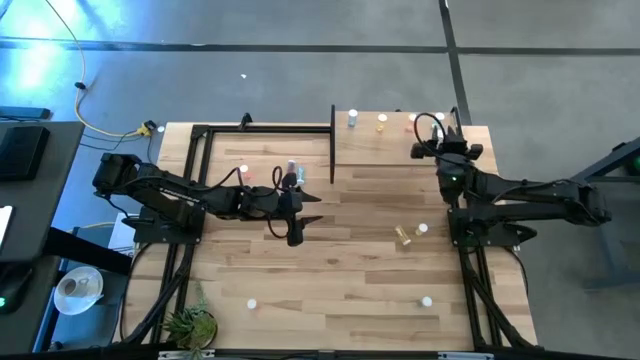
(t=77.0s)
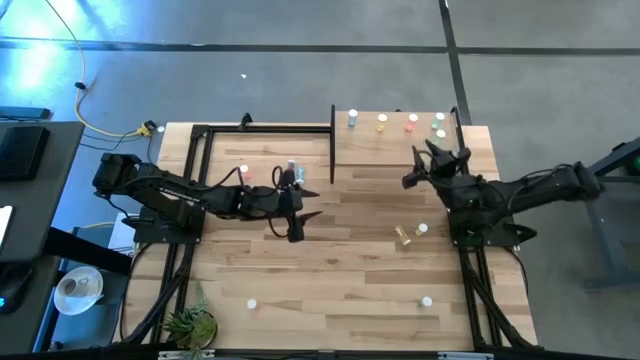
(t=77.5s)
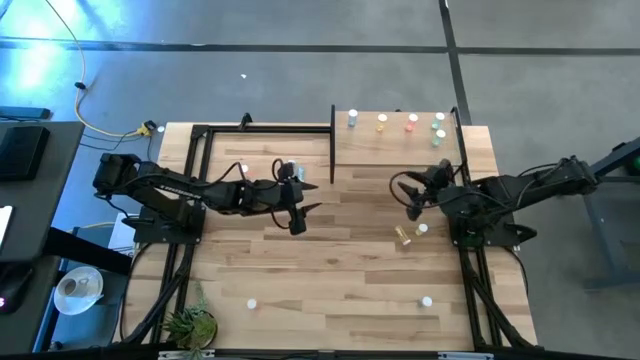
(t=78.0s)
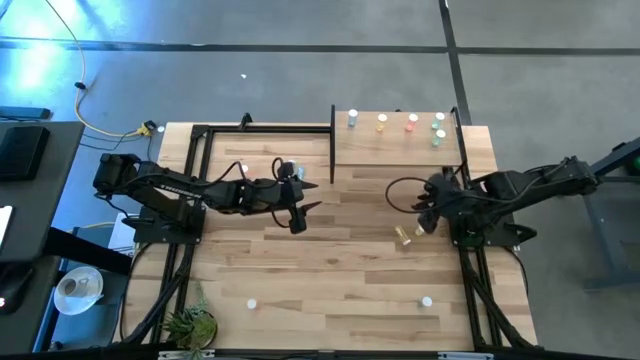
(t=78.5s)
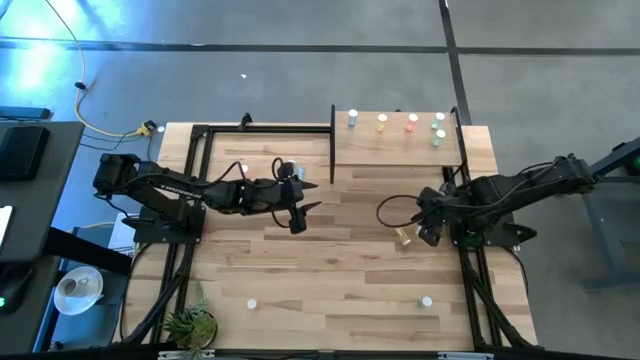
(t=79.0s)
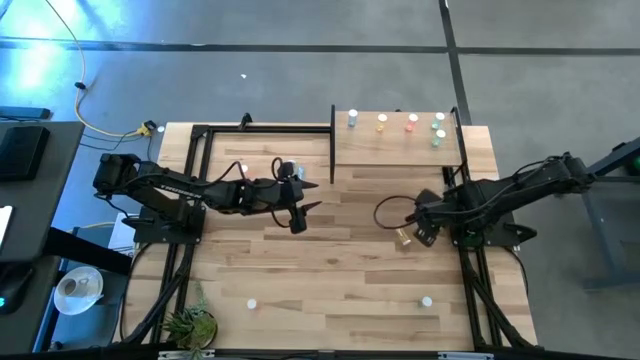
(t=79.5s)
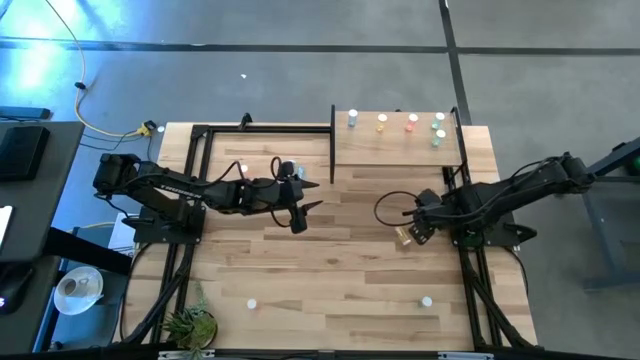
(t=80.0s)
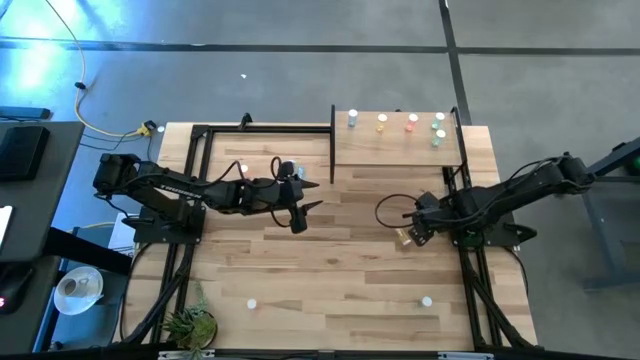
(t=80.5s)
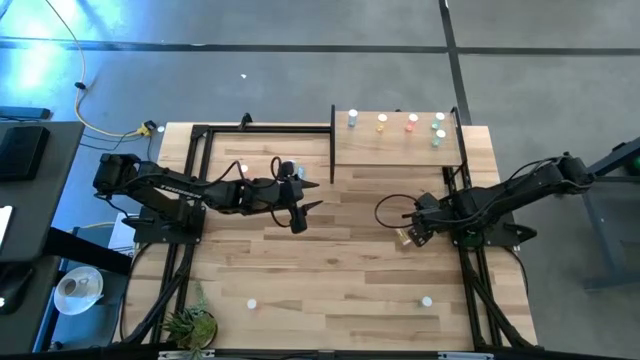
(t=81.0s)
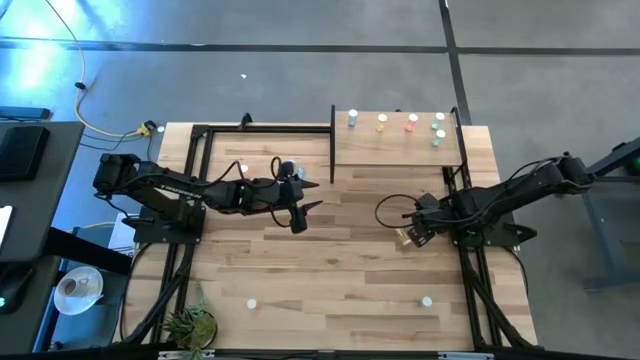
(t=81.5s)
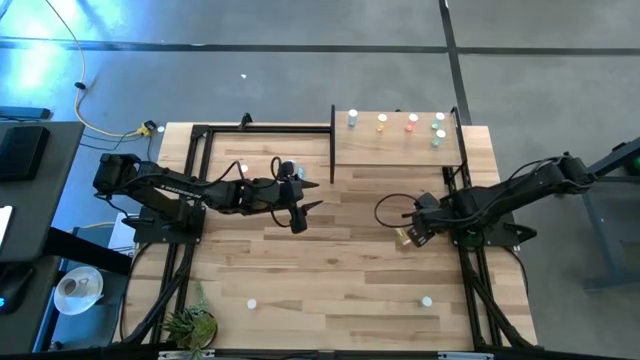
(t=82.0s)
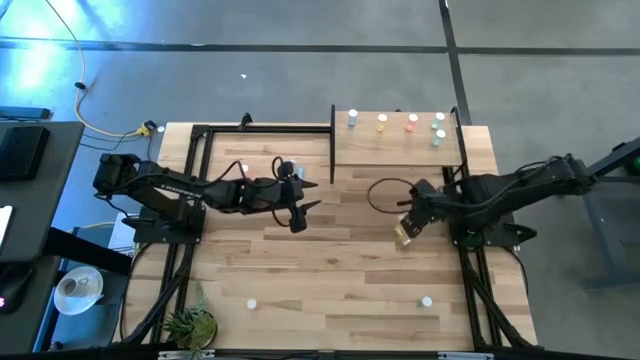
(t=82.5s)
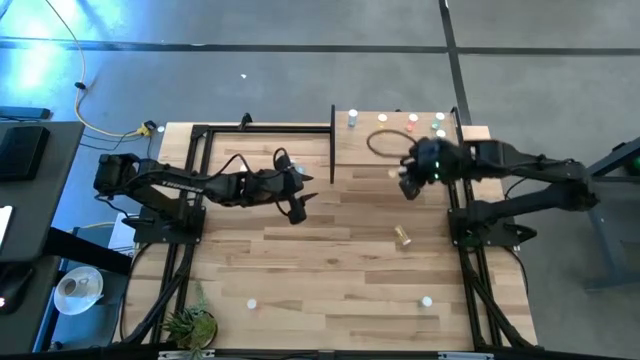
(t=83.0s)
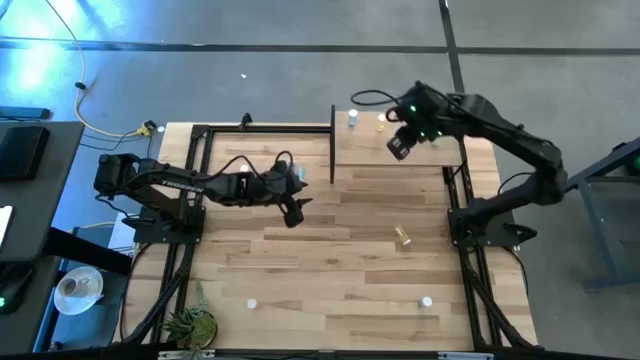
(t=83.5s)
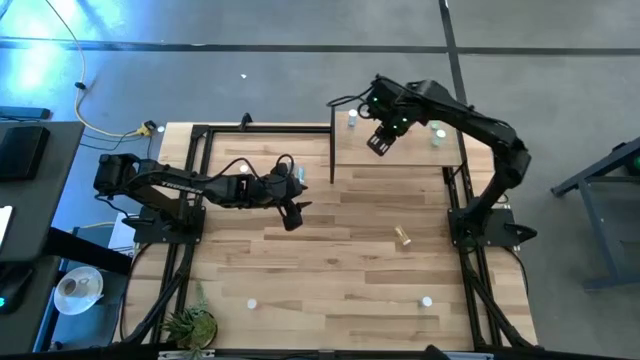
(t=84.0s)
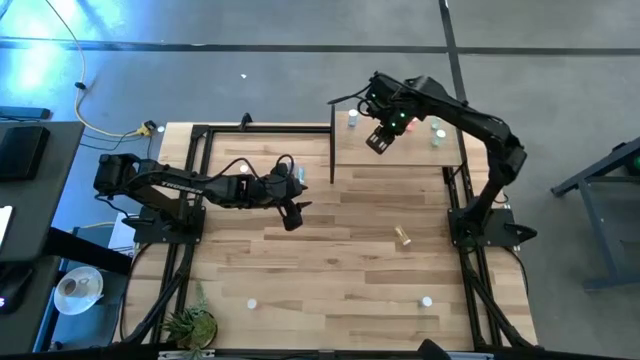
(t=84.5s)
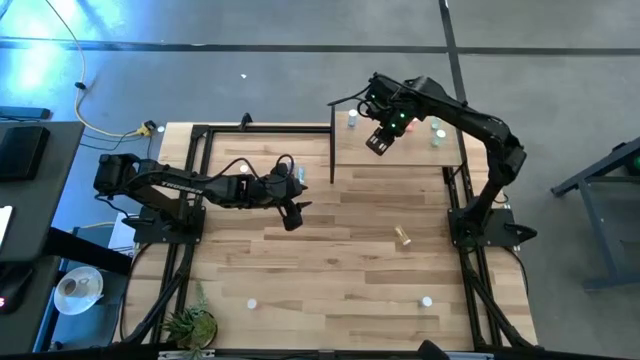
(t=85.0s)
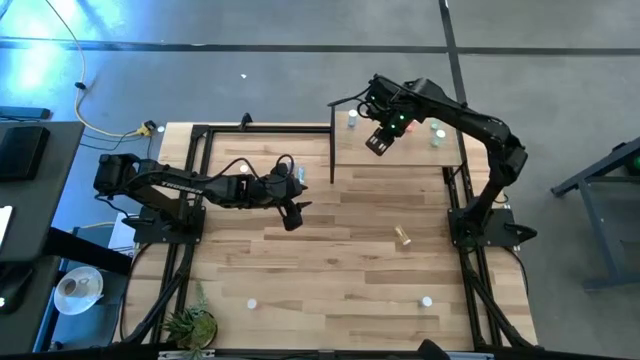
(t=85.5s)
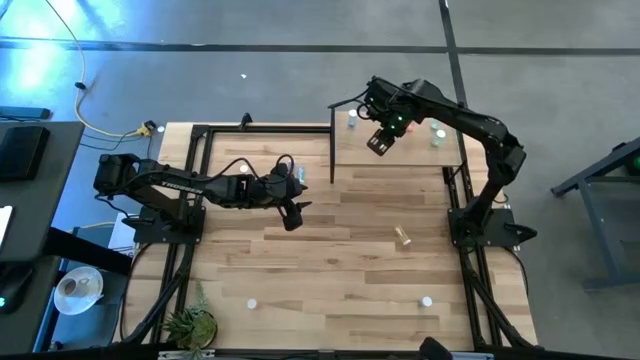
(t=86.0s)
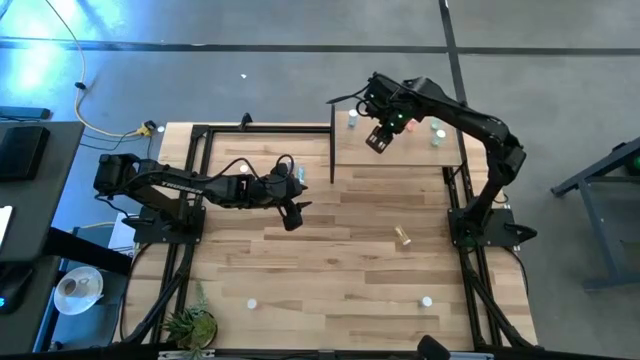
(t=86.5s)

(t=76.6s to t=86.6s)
Task: Pick and place medicine bottles onto shelf by color
Put the right yellow medicine bottle aligned with the other yellow medicine bottle on the shelf

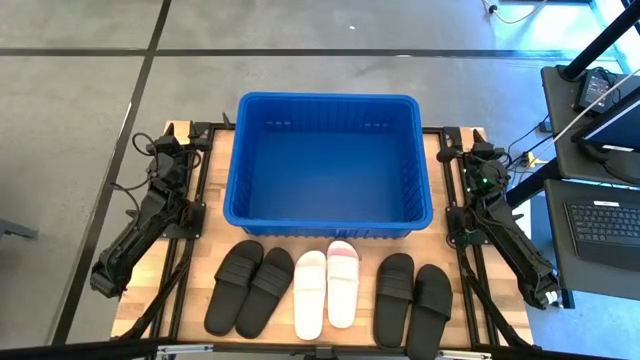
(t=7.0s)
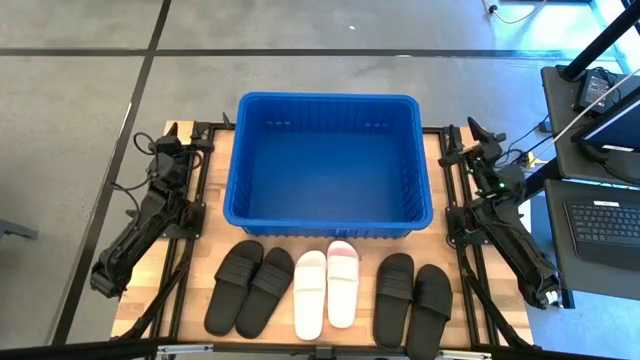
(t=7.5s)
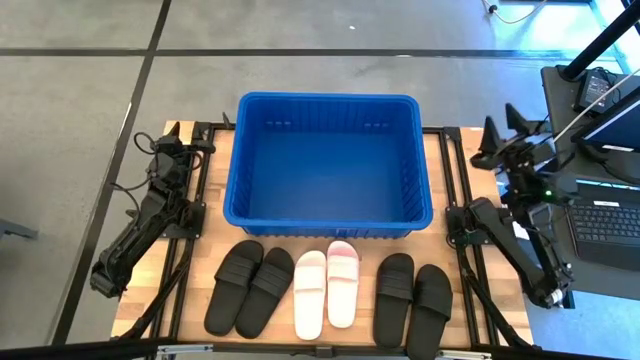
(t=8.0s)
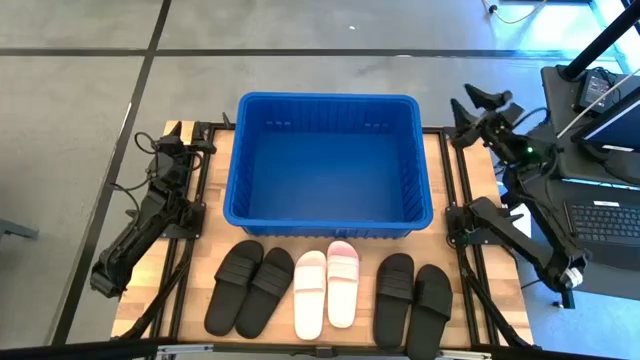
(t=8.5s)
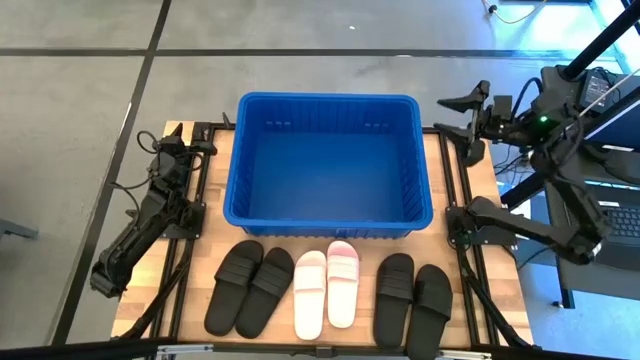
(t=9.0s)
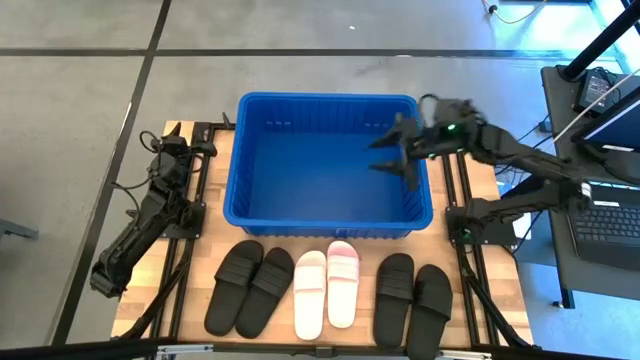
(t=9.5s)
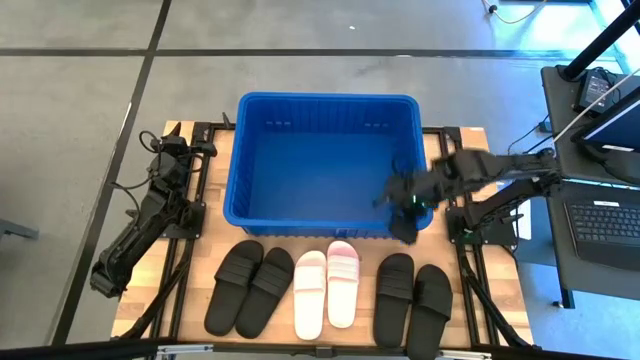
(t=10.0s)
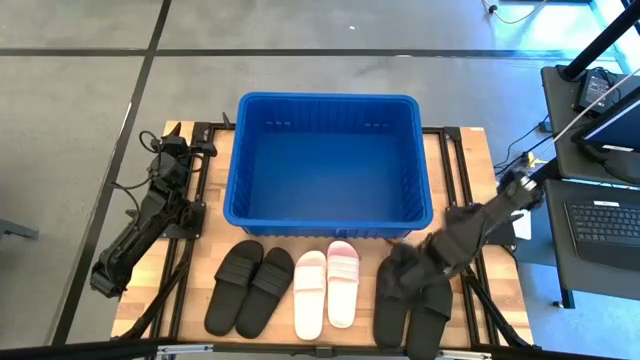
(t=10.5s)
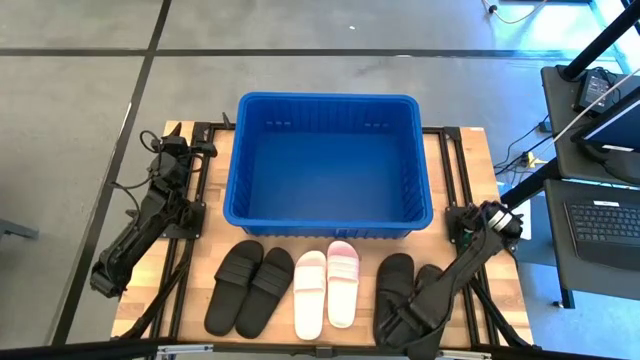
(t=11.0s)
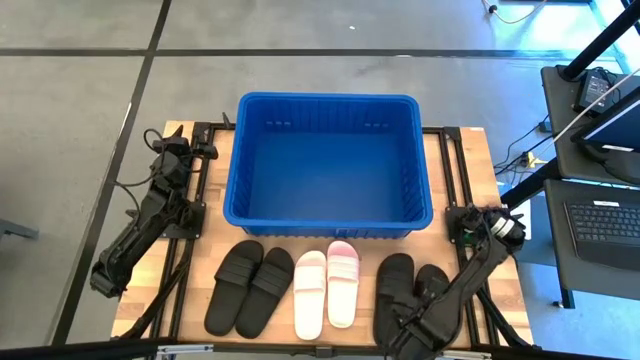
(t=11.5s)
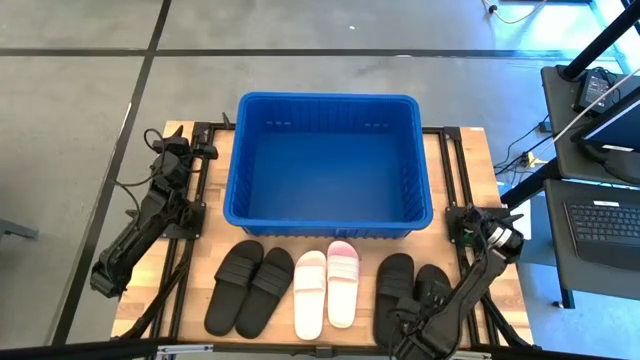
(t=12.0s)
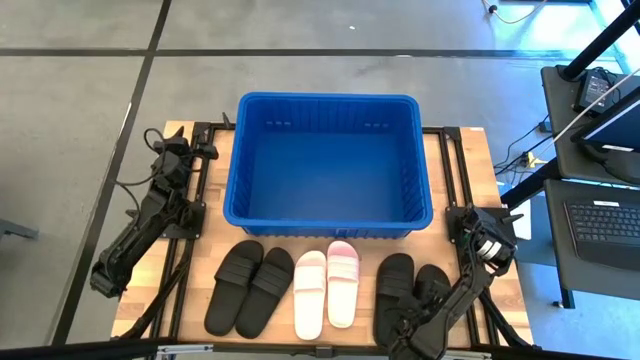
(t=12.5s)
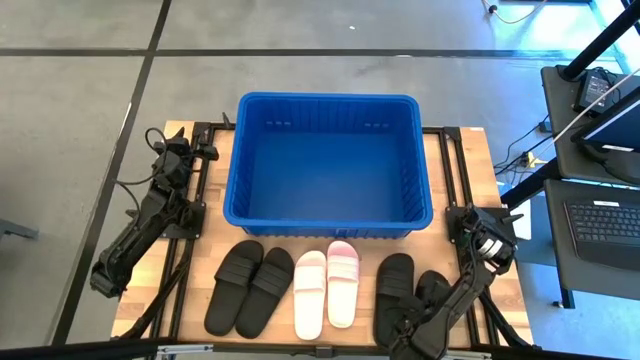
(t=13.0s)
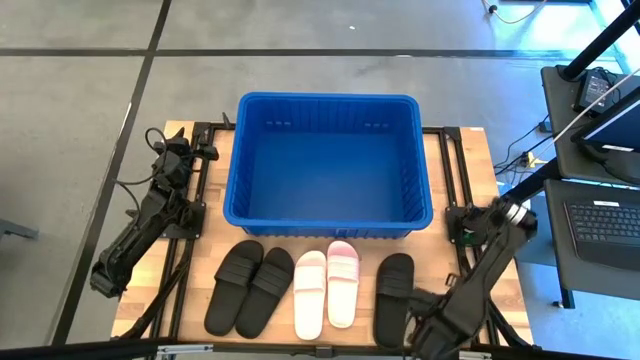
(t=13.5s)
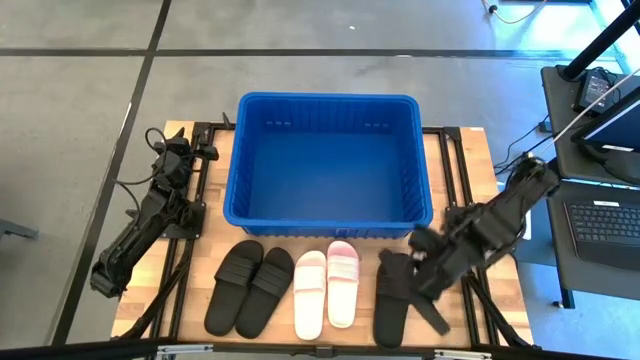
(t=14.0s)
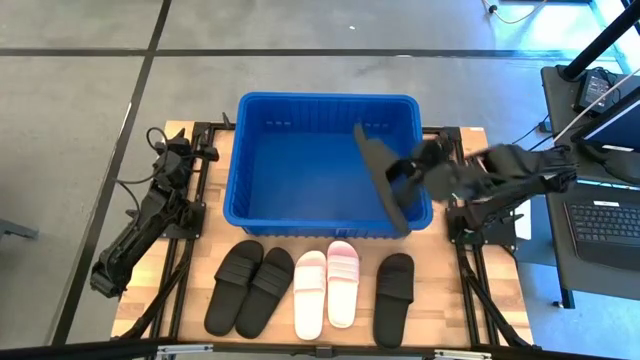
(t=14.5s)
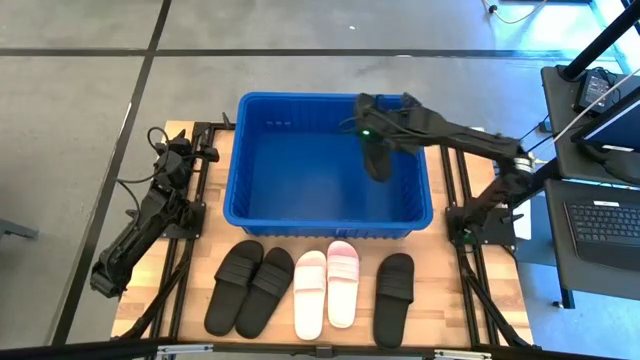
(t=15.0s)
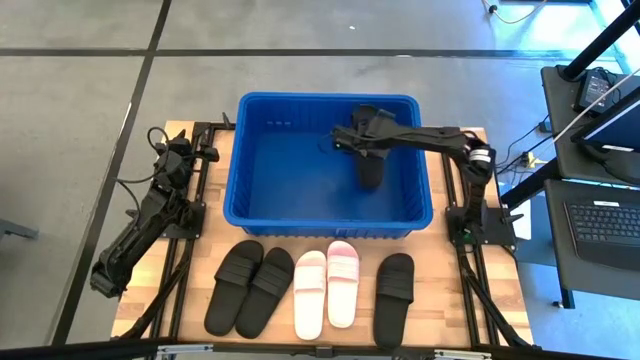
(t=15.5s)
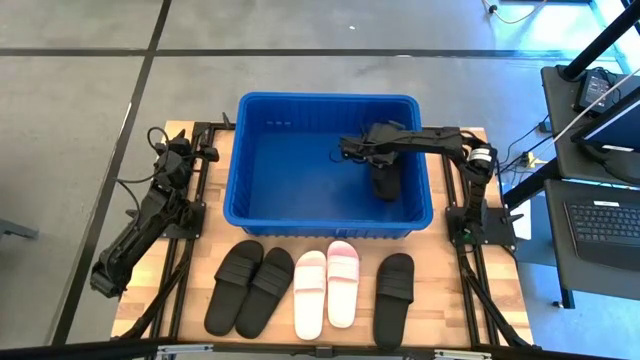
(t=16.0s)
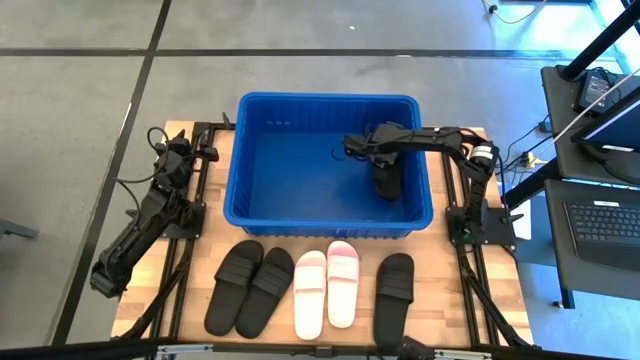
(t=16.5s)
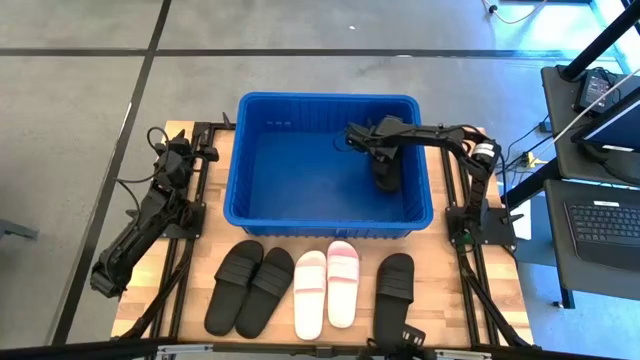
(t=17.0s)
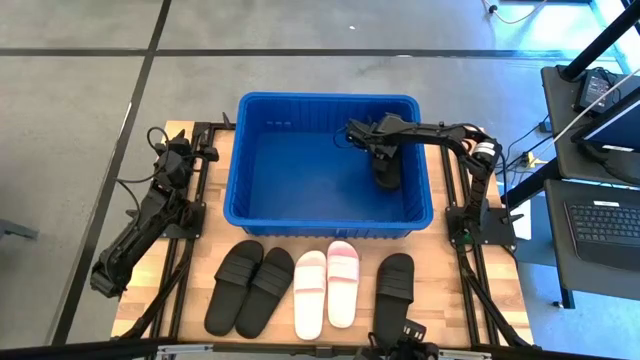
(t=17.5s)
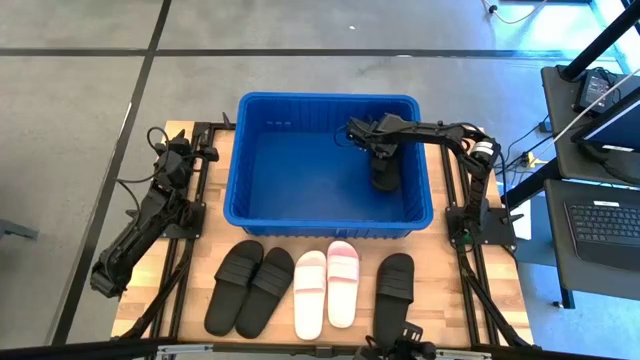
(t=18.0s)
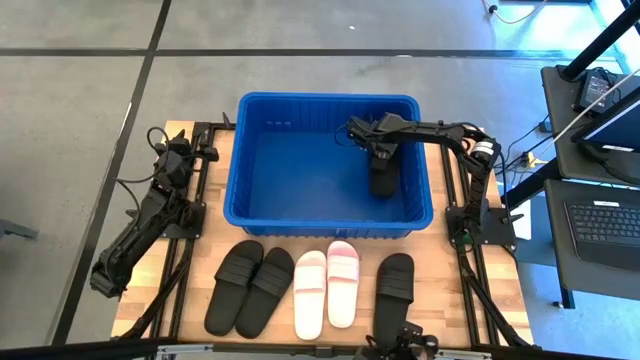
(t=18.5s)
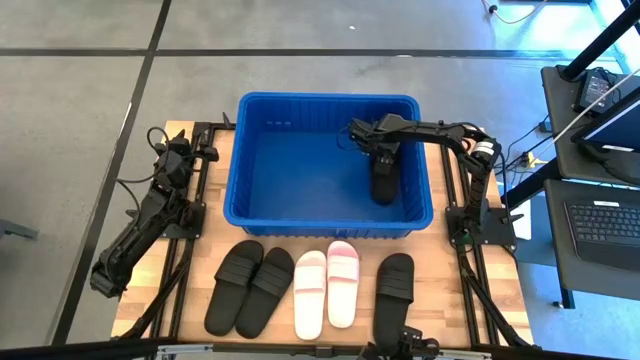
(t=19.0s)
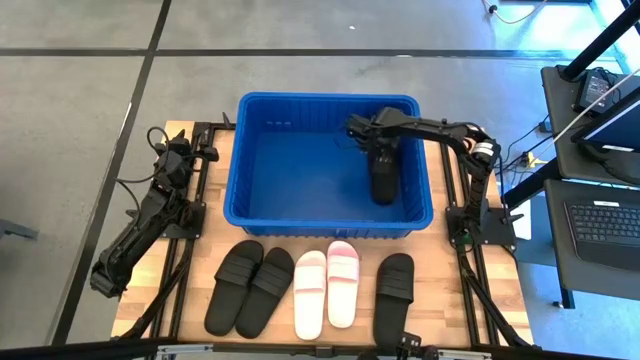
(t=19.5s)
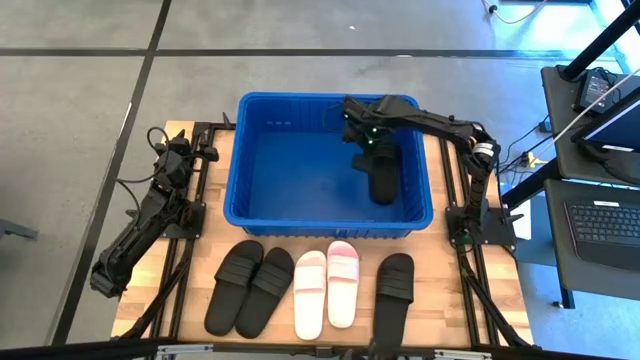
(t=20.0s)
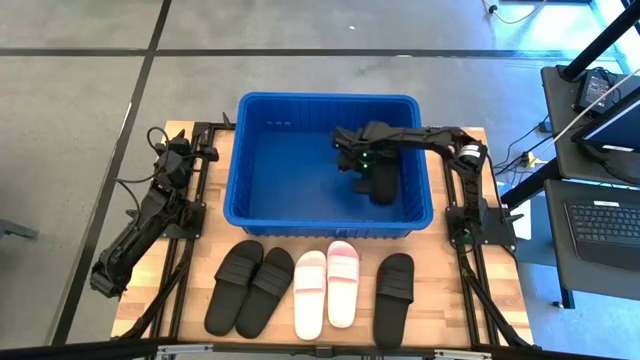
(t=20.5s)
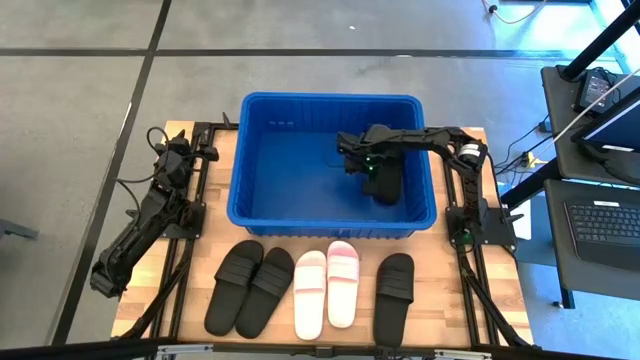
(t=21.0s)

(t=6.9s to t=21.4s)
Task: Pick and place slides into bin
Put the black slipper into the blue bin
